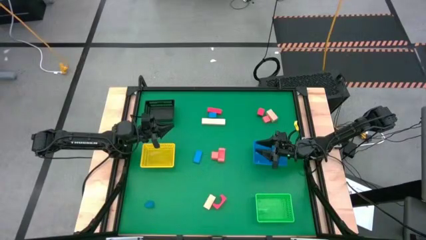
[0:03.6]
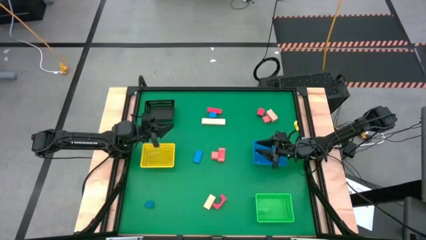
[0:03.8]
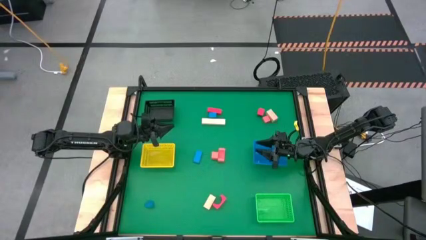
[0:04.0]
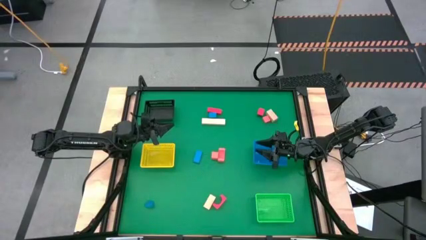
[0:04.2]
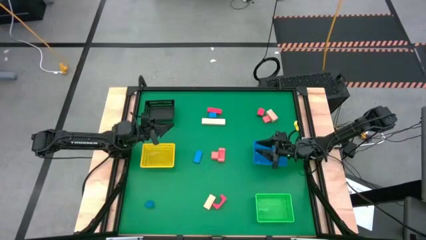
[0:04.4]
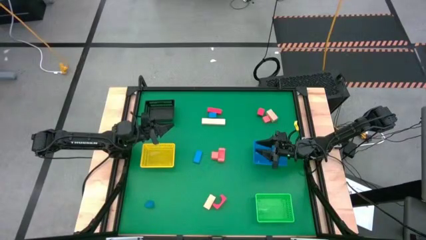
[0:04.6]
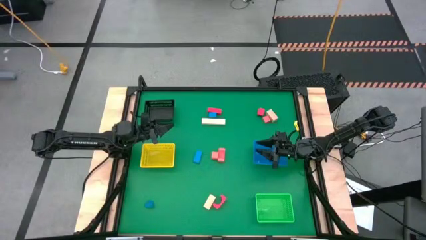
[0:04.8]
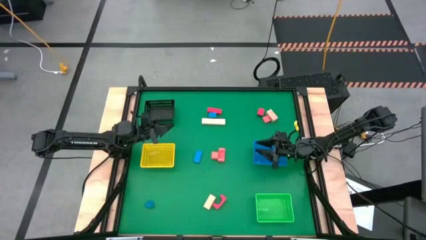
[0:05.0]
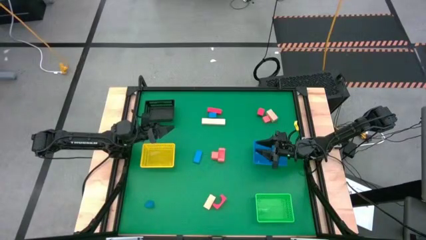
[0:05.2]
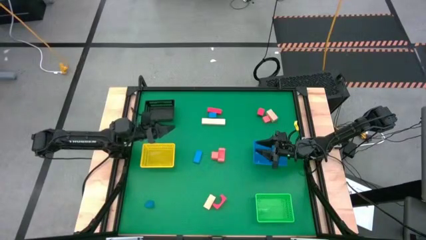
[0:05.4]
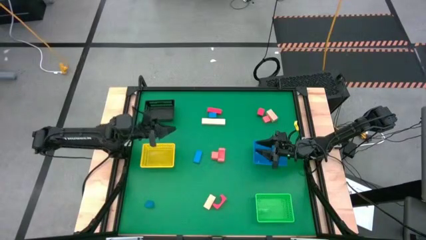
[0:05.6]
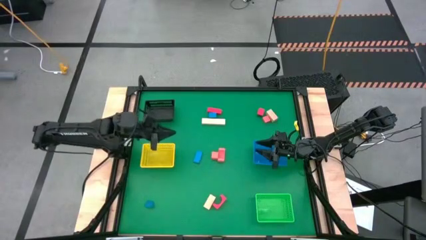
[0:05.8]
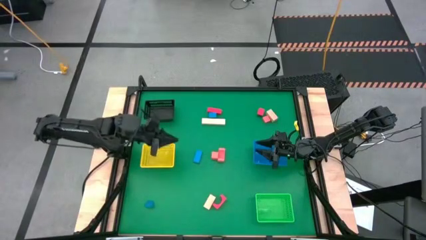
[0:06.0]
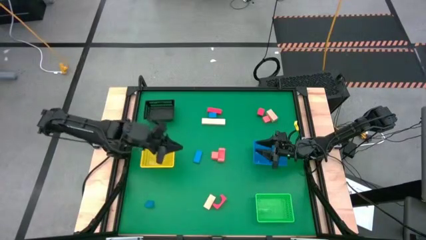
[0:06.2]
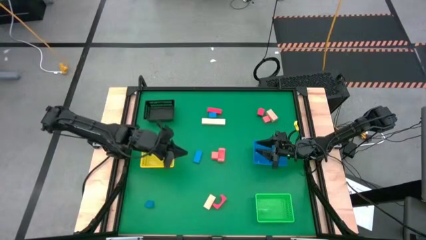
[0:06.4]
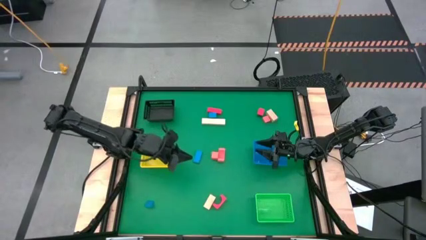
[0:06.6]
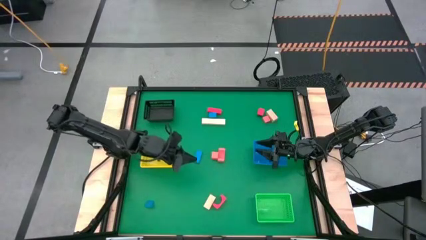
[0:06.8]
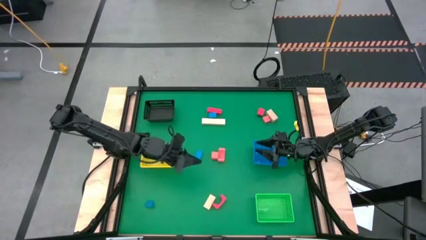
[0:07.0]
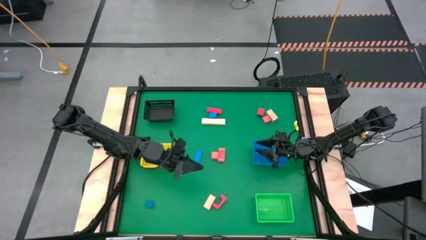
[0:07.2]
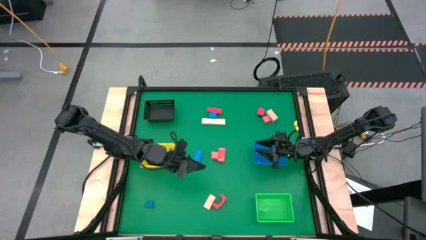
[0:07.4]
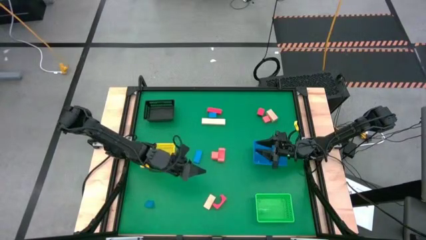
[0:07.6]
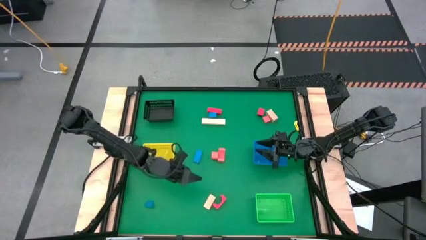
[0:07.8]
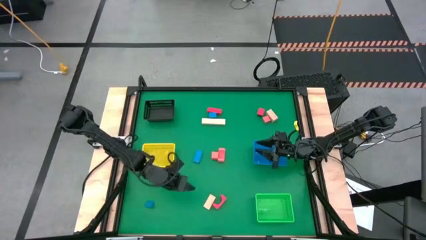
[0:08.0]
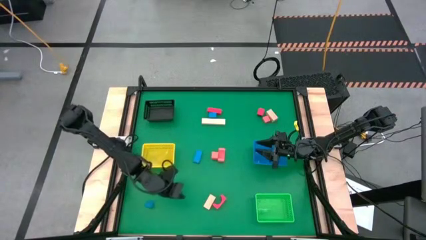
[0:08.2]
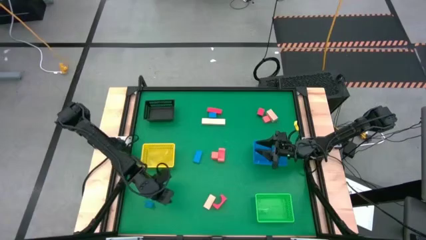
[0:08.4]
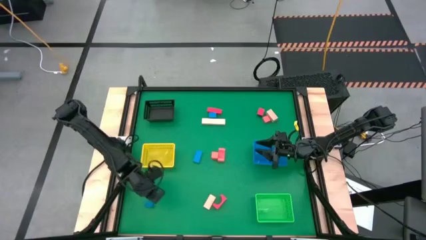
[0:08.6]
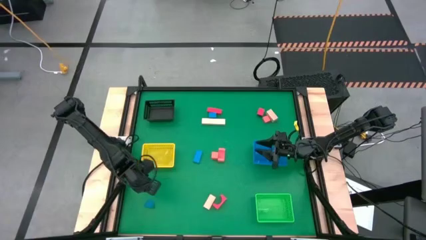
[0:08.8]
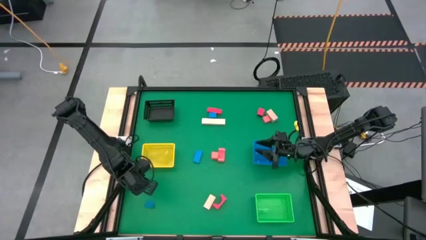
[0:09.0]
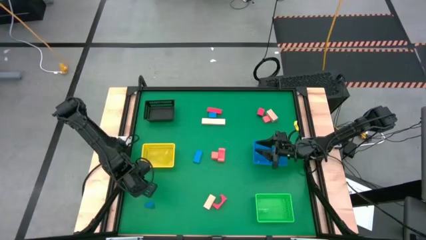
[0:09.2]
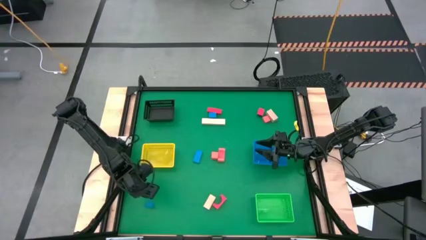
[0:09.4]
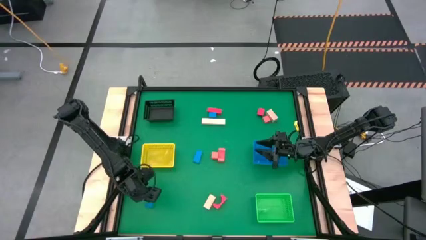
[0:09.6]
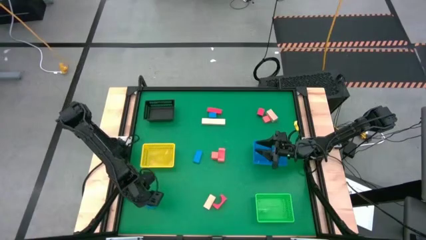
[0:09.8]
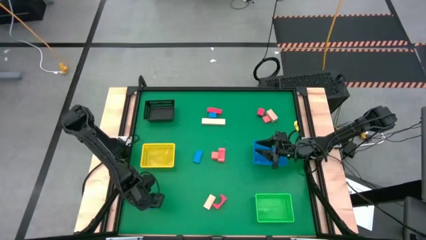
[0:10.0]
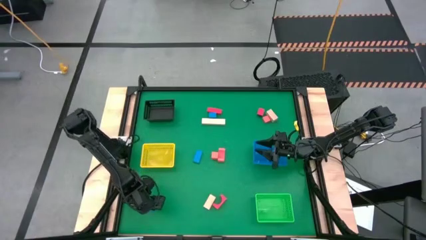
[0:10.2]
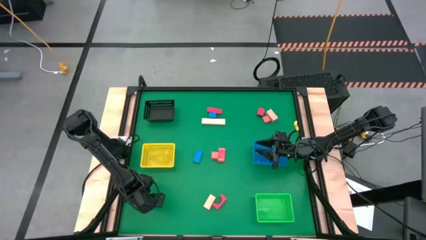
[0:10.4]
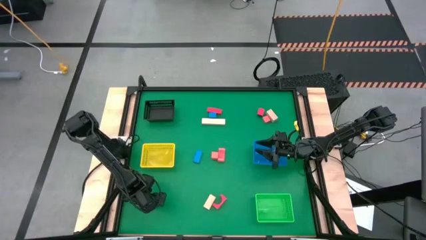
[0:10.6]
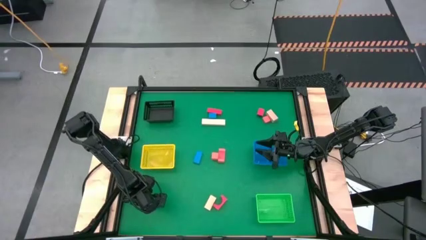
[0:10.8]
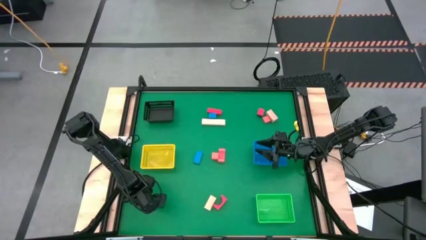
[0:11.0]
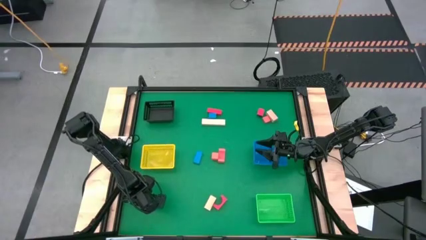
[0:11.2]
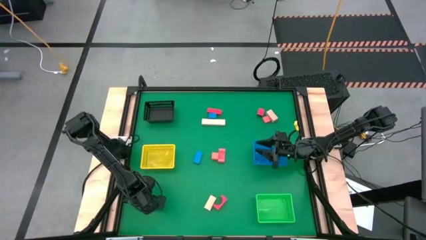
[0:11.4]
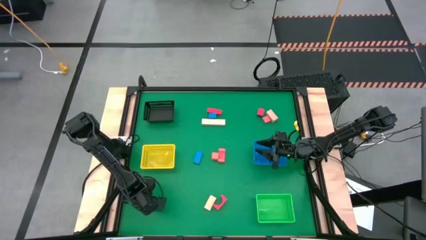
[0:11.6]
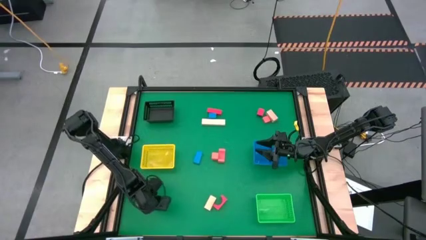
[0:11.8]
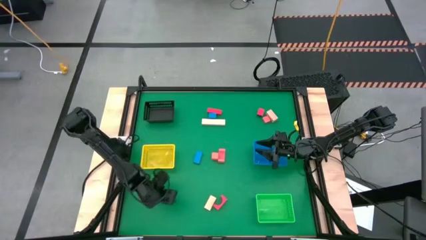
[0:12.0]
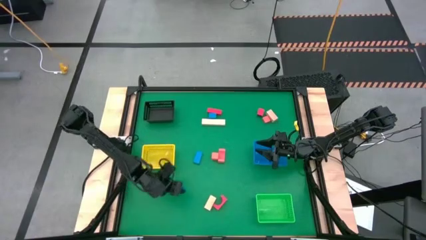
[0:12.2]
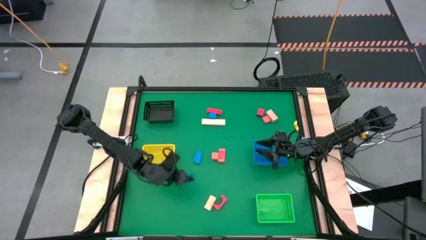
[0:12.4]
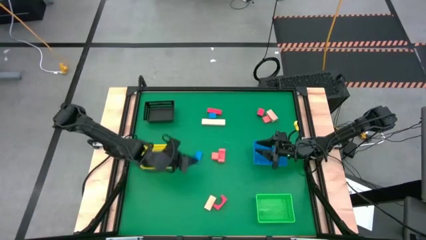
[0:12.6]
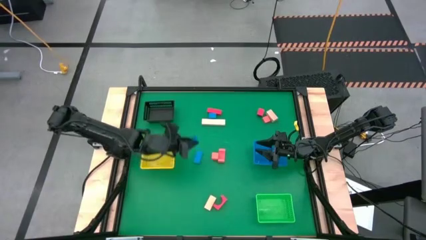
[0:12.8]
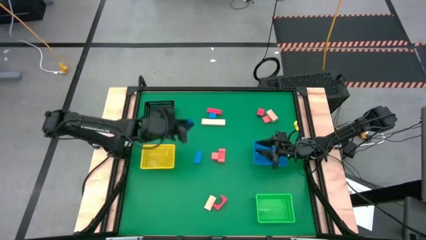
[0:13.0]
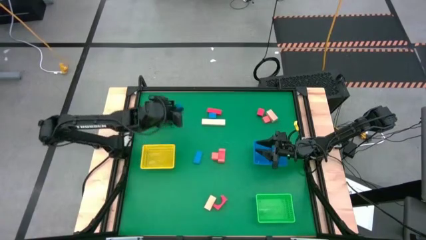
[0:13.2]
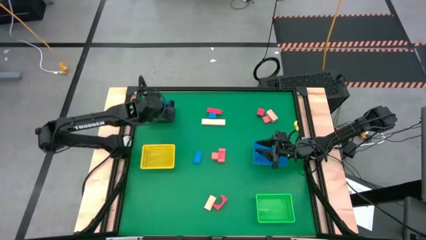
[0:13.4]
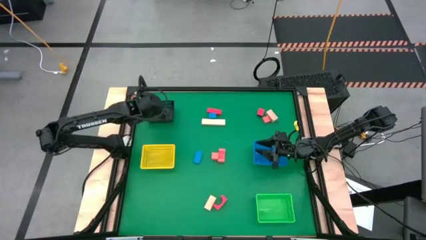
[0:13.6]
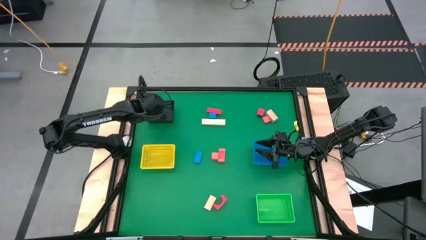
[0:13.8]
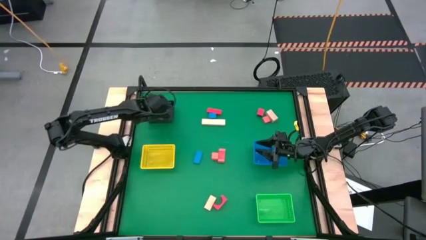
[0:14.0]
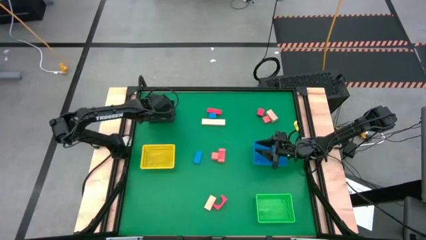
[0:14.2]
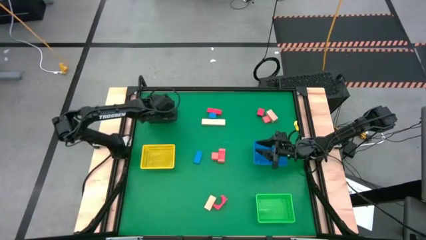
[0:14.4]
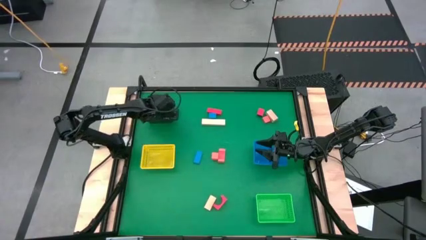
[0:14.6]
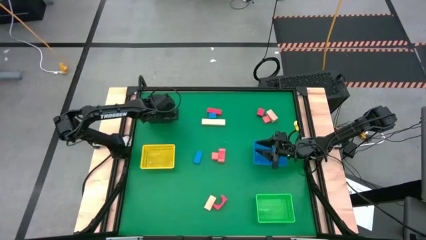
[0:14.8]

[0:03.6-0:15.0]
Task: Sort & place blocks by color
Put the bottom blue square block into the black basket

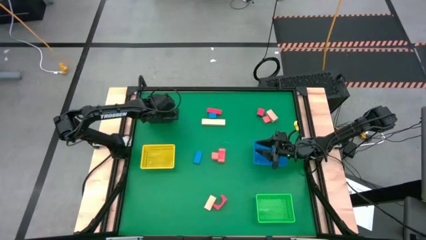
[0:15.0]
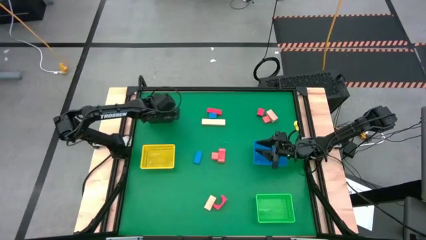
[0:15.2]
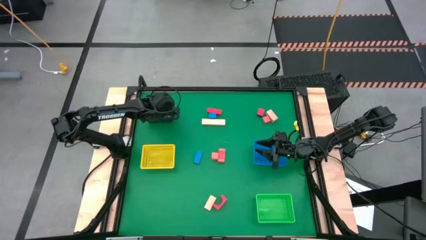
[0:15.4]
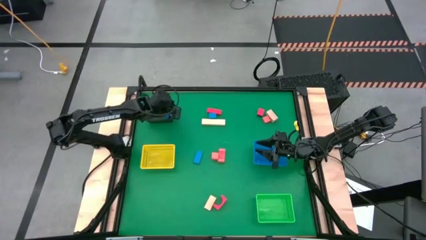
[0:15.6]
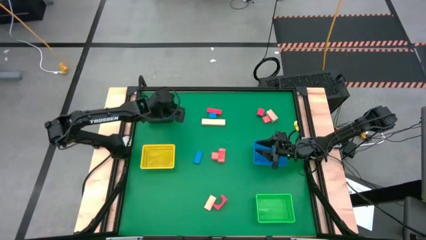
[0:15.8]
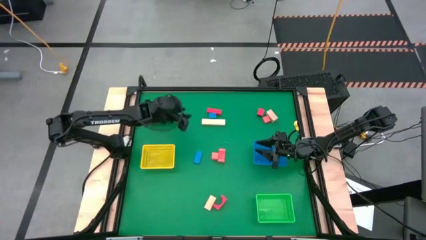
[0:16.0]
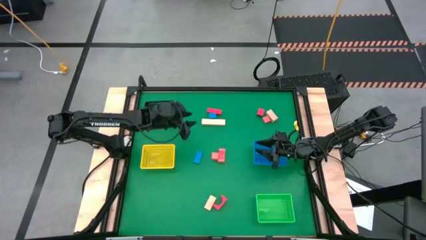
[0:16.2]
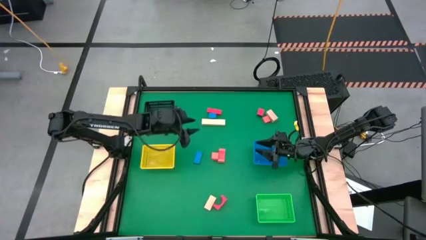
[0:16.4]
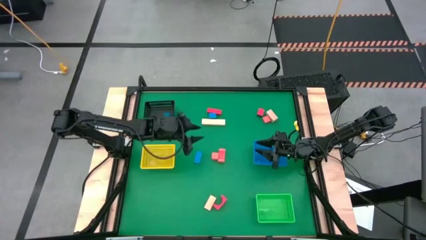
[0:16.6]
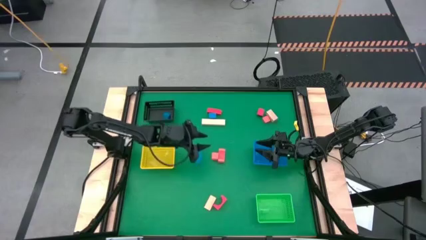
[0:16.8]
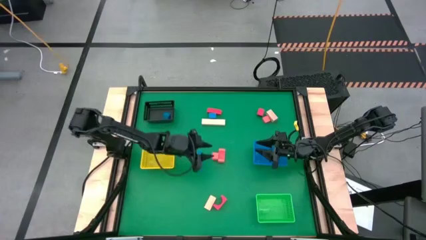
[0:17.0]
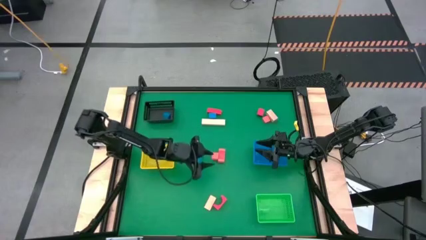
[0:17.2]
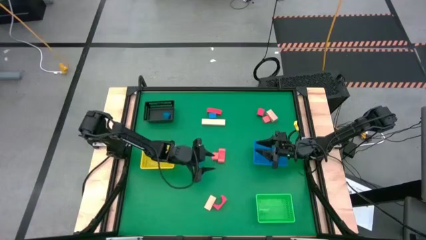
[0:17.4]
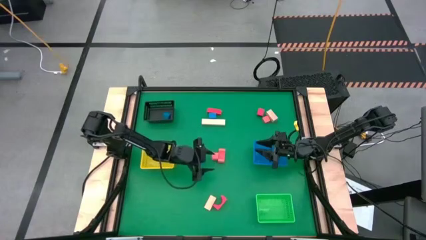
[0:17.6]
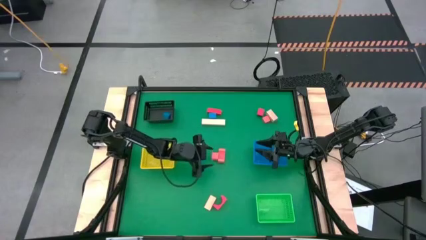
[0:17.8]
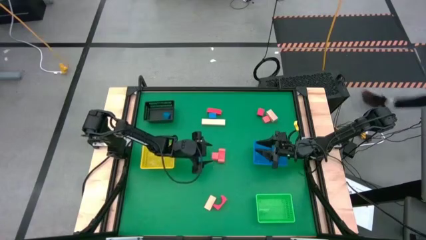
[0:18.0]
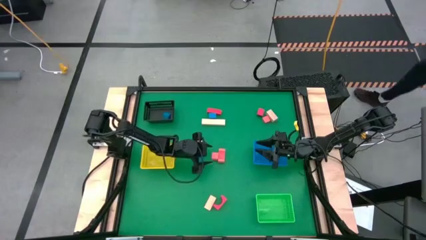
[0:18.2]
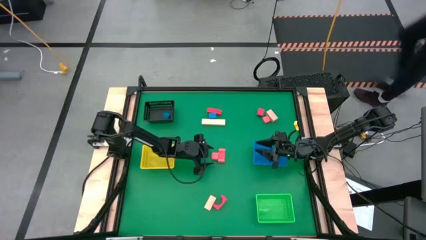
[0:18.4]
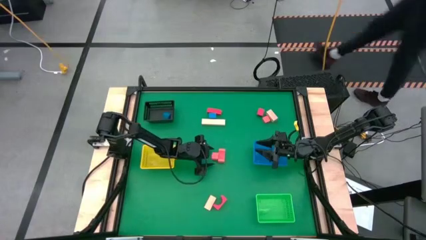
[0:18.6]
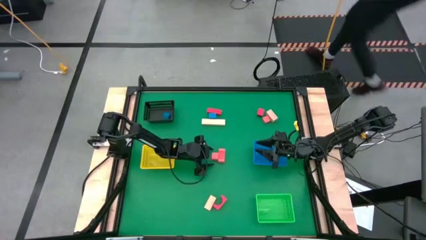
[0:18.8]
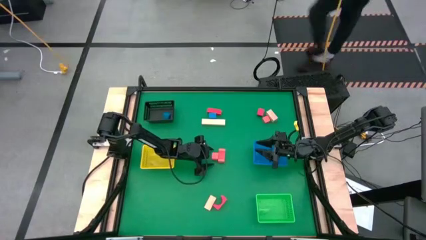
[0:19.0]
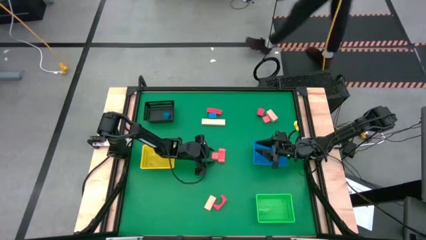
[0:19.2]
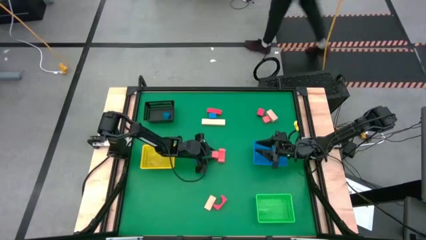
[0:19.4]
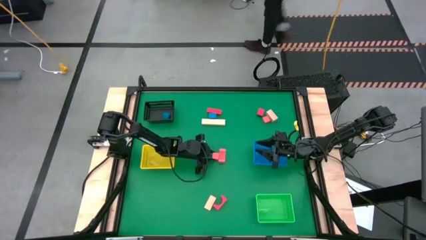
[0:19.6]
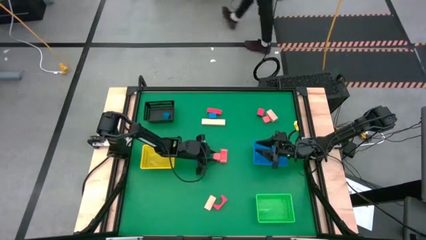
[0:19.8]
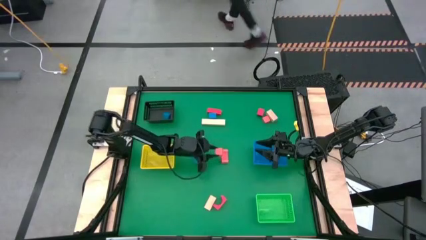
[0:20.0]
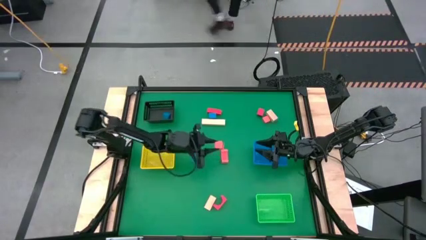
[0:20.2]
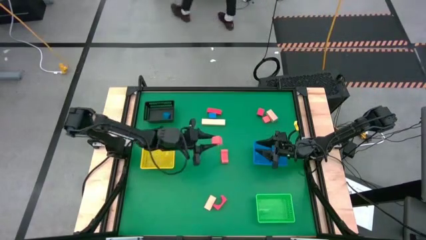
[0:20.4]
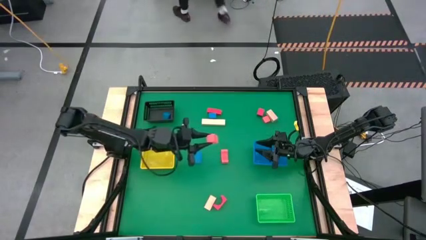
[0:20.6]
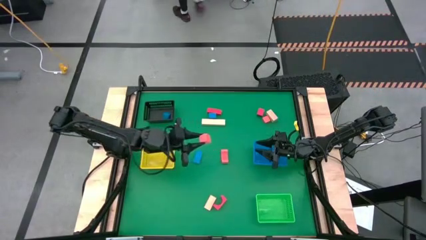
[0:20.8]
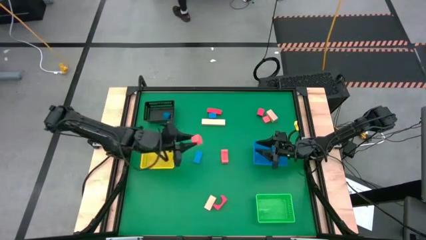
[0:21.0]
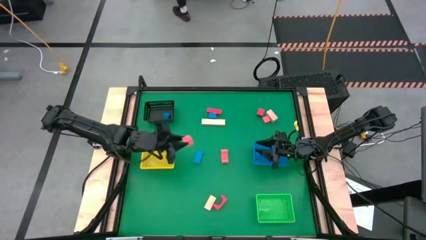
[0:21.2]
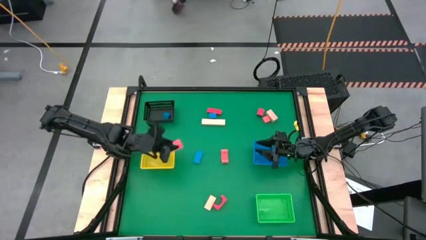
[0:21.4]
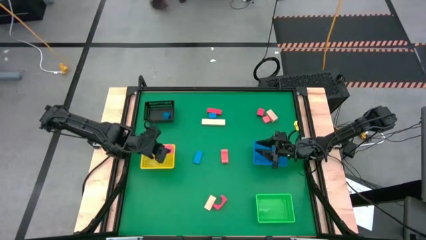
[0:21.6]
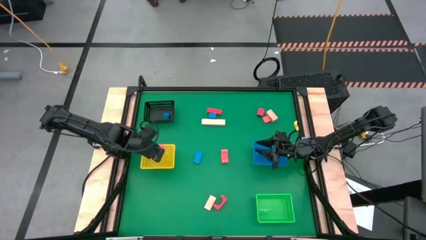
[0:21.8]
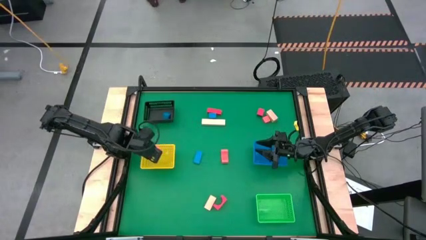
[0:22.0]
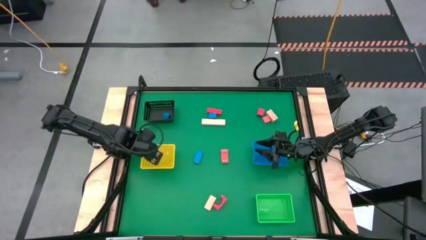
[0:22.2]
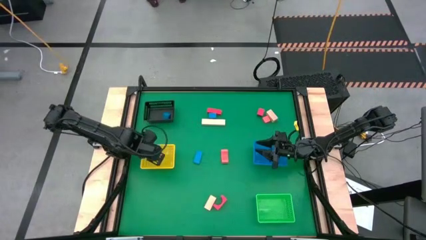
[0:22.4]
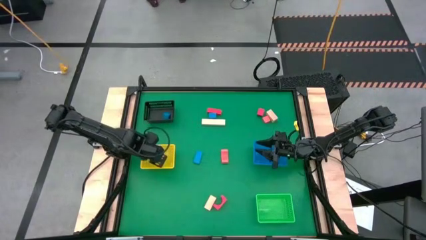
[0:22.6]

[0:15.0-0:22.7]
Put the central pink square block into the yellow basket
